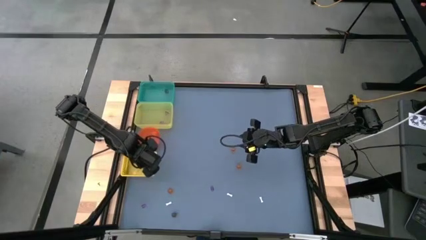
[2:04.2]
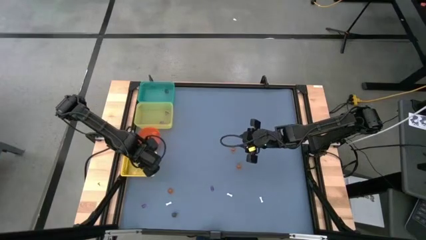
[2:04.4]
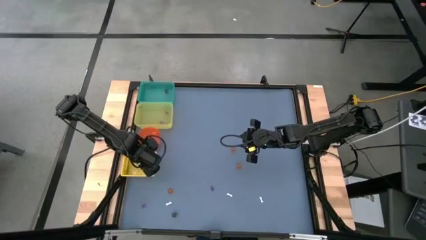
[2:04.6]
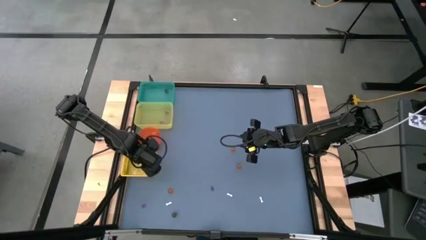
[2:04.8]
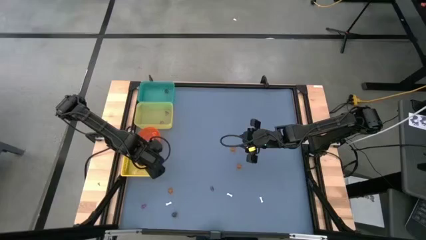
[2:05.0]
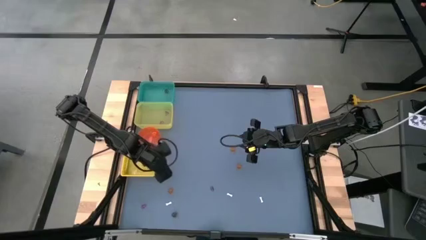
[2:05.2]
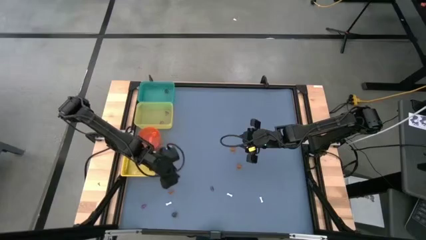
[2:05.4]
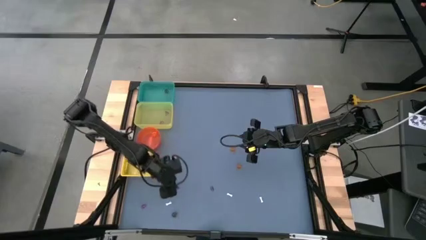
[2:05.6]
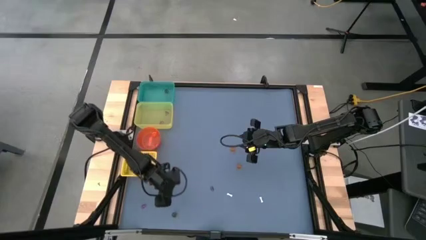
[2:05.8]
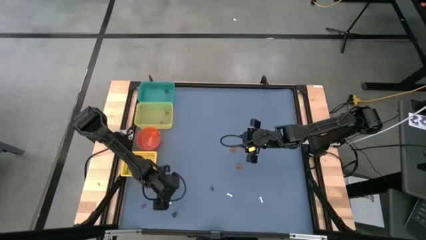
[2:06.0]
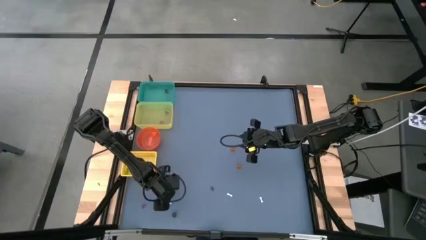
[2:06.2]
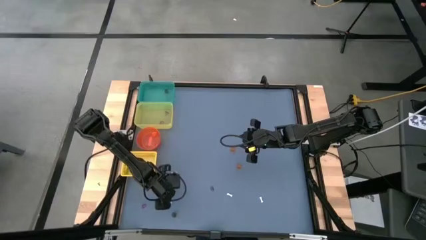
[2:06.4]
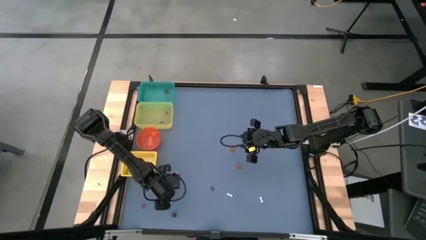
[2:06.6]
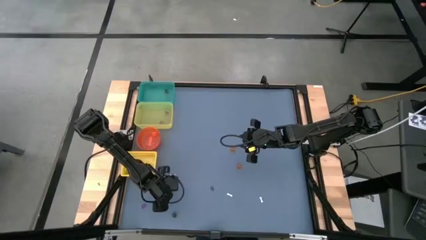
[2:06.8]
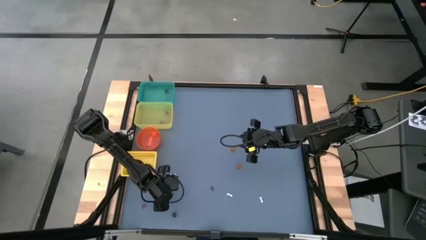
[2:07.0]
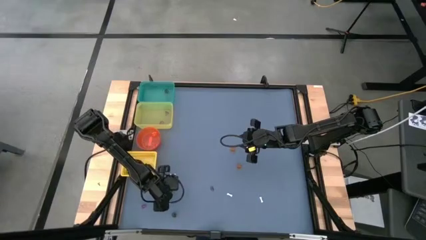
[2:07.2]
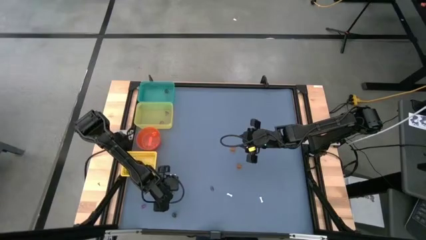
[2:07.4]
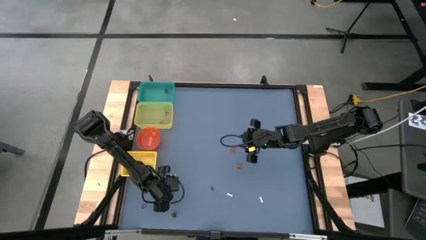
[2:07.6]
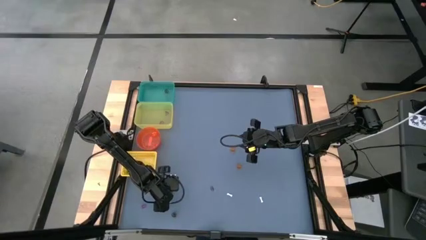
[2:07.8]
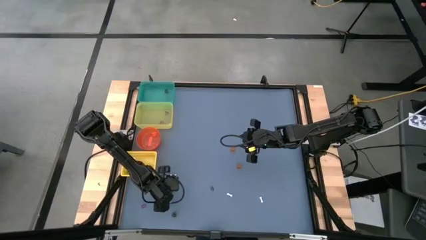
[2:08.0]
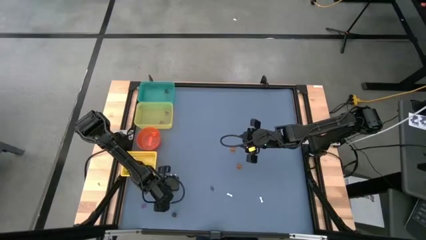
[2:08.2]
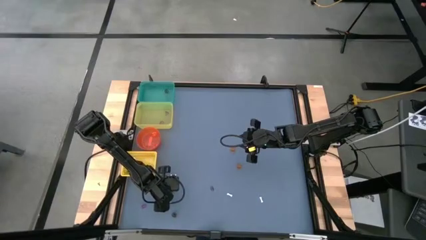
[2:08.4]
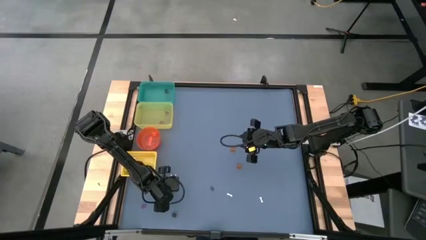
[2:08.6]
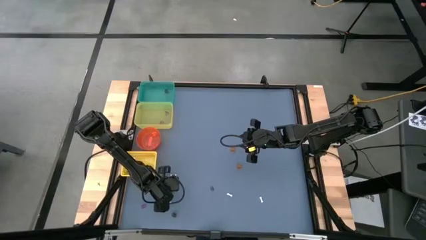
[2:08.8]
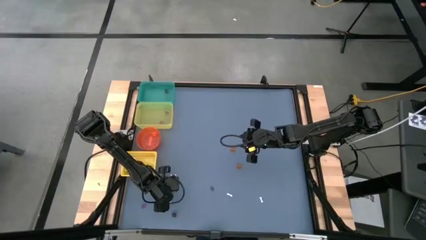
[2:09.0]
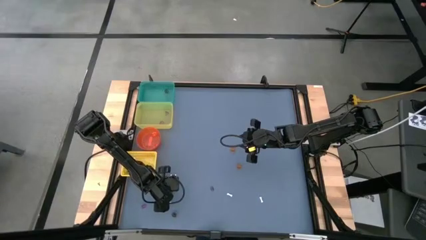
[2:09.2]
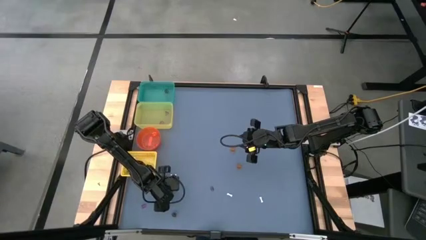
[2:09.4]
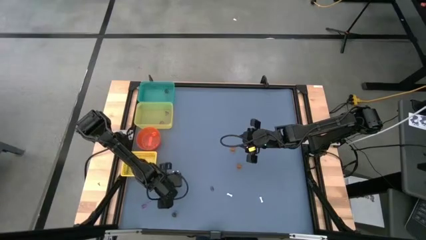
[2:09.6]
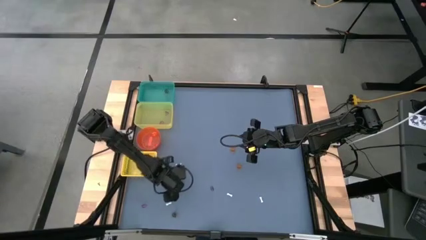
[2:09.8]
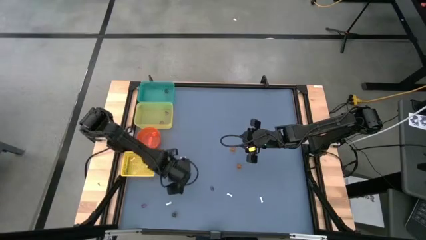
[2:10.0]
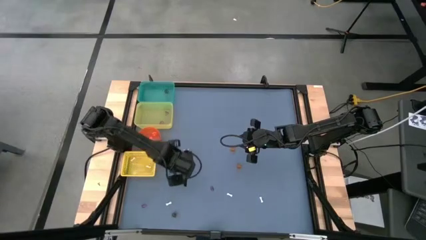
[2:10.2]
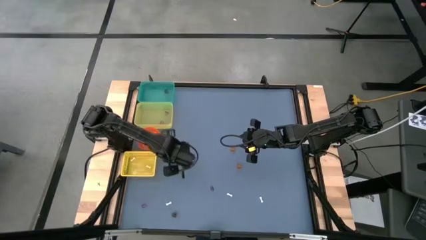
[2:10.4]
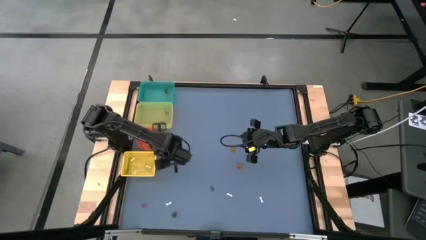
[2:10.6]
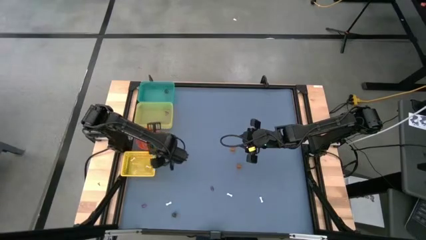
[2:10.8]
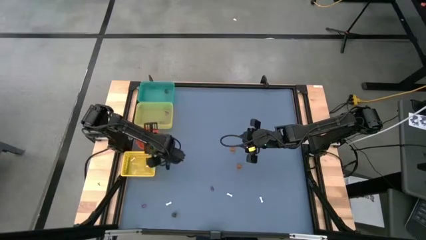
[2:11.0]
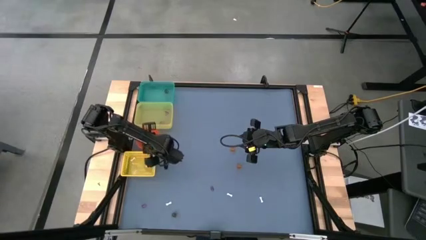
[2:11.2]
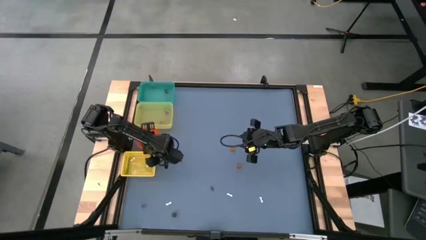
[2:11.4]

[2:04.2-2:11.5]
Task: Sort Halloween decoration
Put the left orange pumpkin toy into the orange bin

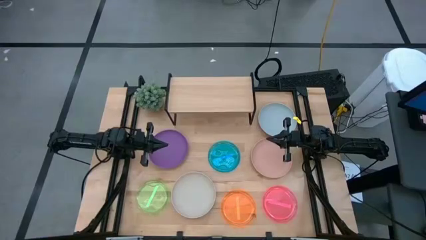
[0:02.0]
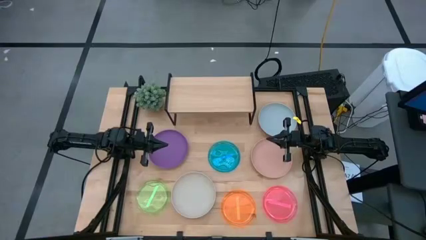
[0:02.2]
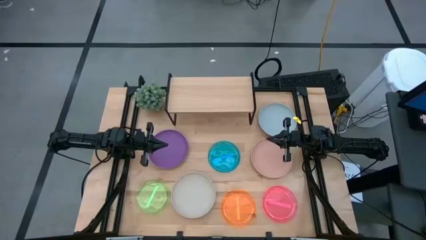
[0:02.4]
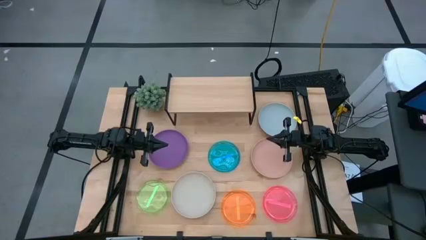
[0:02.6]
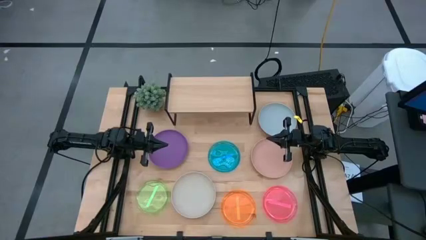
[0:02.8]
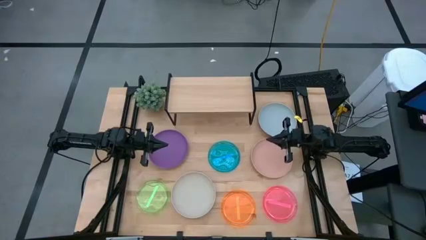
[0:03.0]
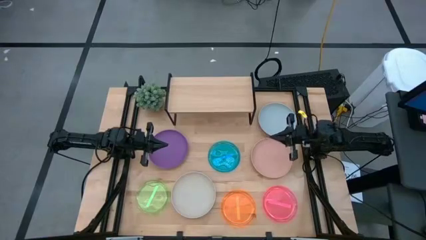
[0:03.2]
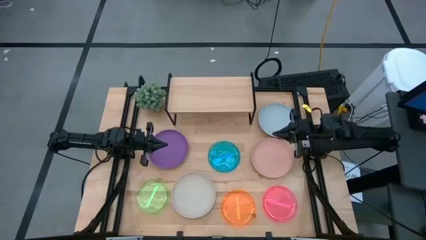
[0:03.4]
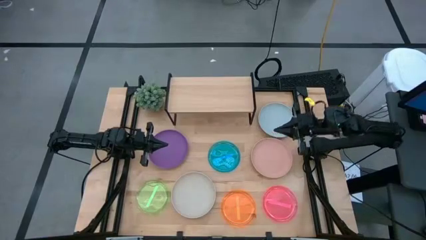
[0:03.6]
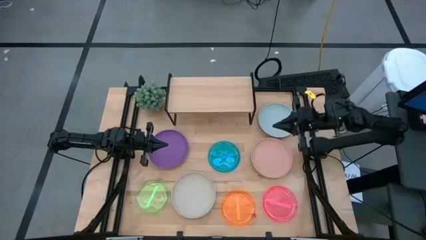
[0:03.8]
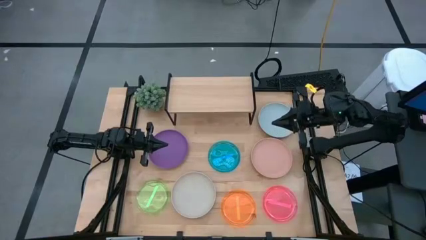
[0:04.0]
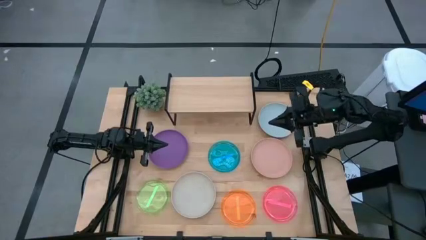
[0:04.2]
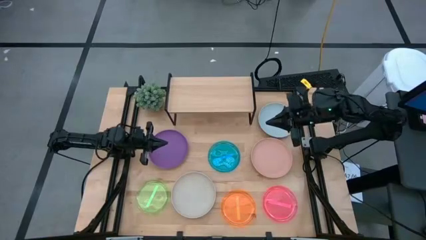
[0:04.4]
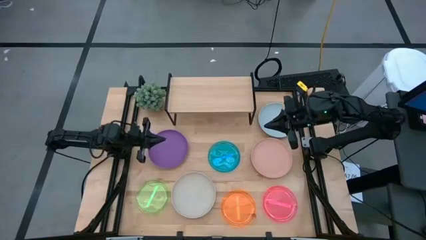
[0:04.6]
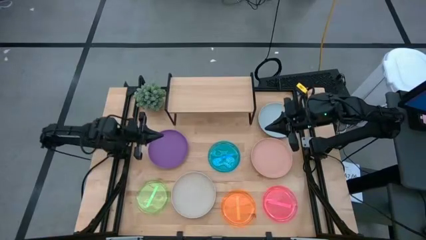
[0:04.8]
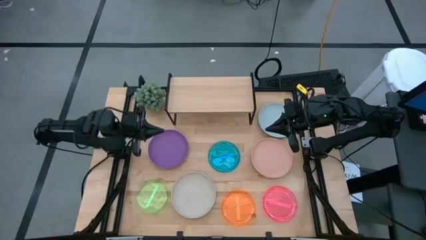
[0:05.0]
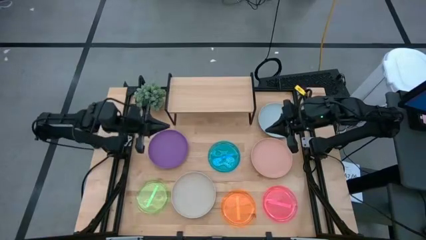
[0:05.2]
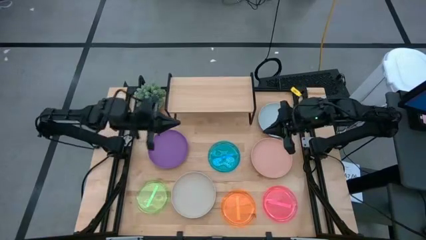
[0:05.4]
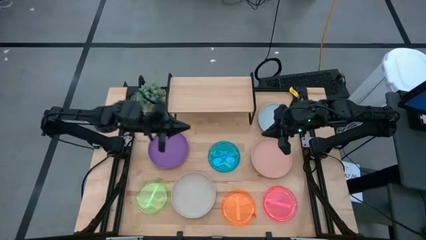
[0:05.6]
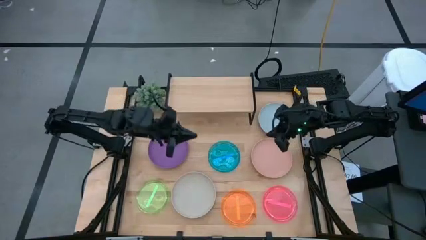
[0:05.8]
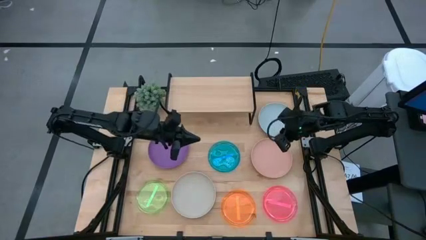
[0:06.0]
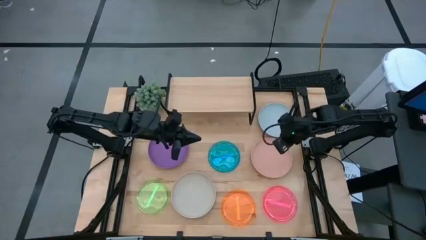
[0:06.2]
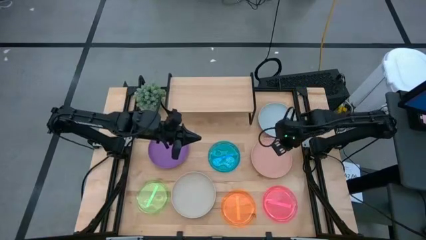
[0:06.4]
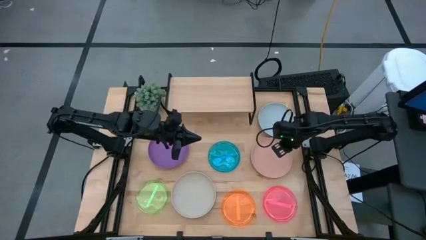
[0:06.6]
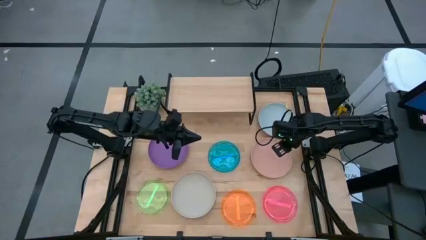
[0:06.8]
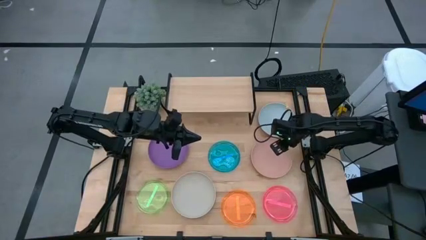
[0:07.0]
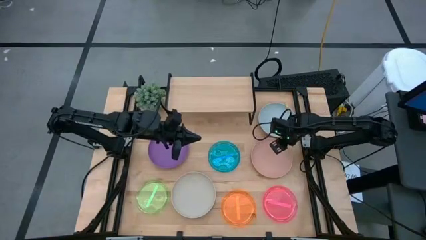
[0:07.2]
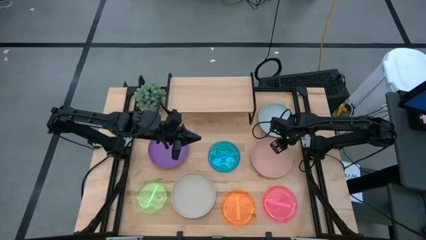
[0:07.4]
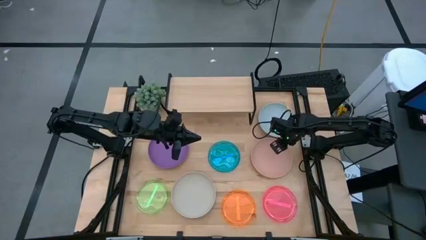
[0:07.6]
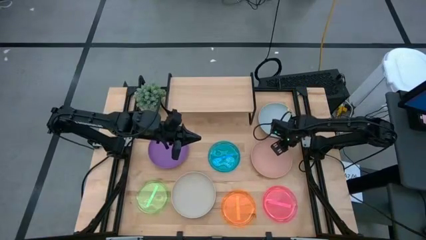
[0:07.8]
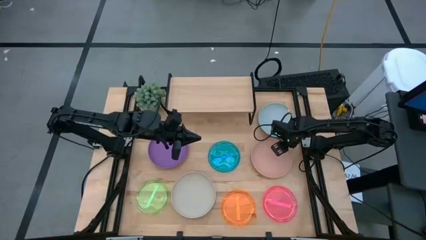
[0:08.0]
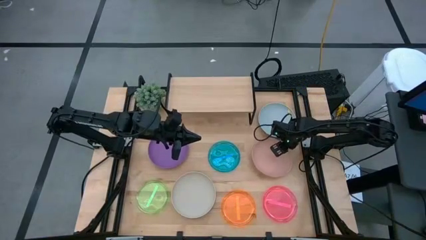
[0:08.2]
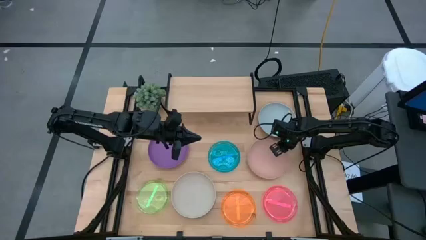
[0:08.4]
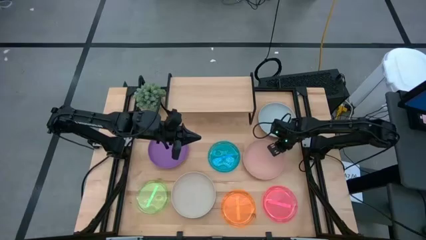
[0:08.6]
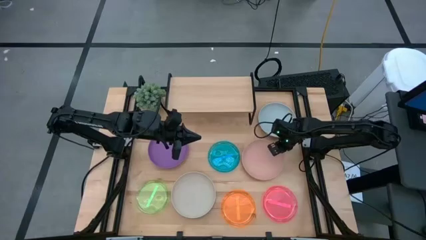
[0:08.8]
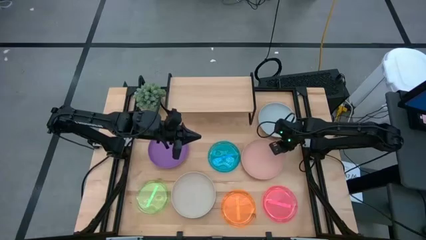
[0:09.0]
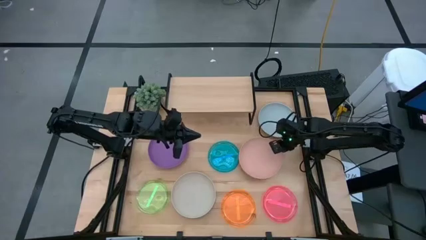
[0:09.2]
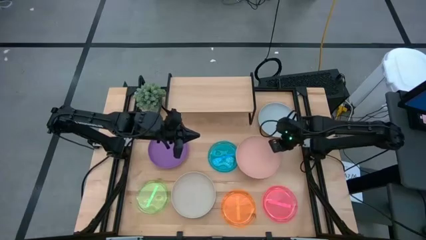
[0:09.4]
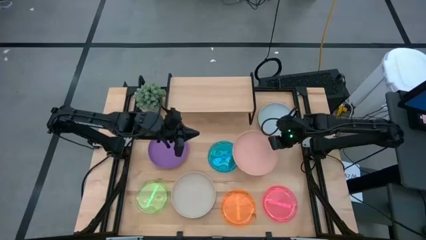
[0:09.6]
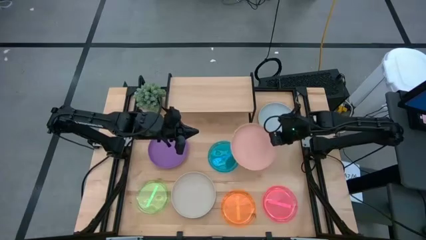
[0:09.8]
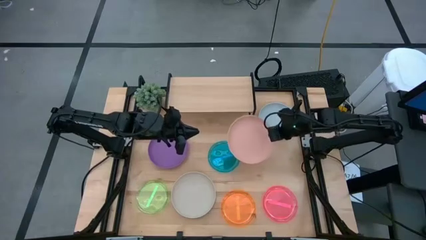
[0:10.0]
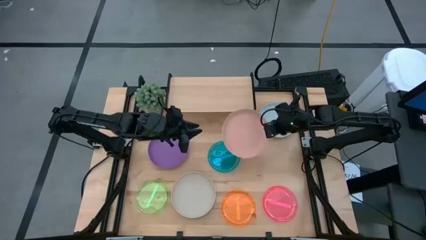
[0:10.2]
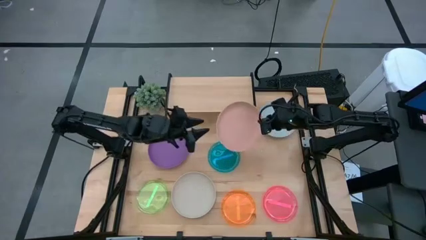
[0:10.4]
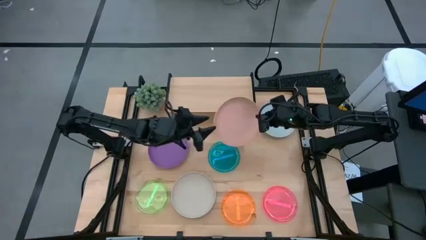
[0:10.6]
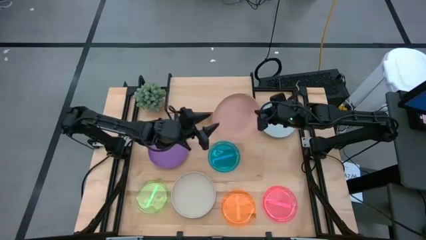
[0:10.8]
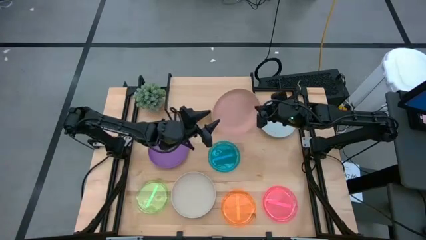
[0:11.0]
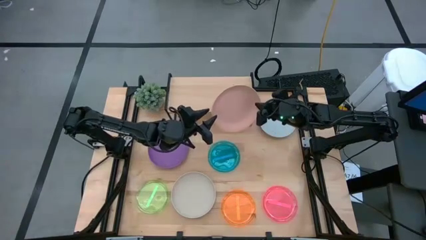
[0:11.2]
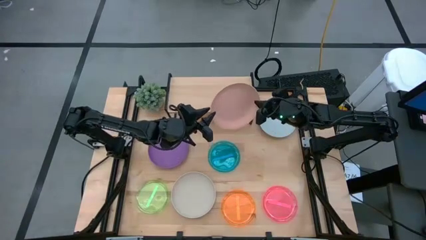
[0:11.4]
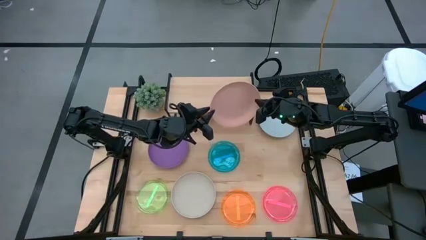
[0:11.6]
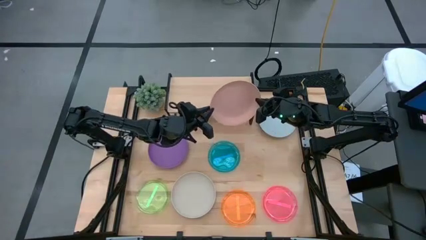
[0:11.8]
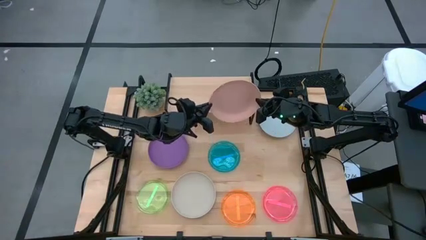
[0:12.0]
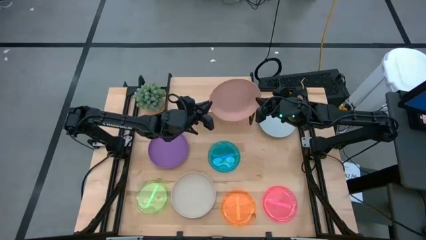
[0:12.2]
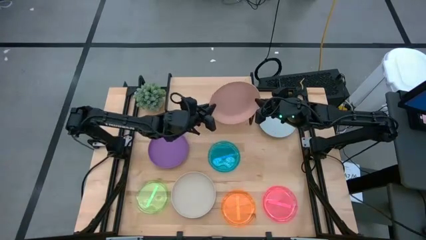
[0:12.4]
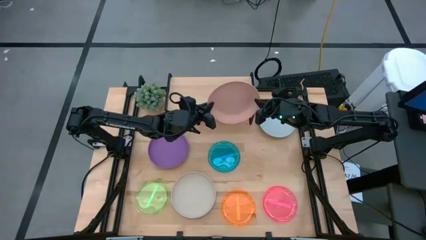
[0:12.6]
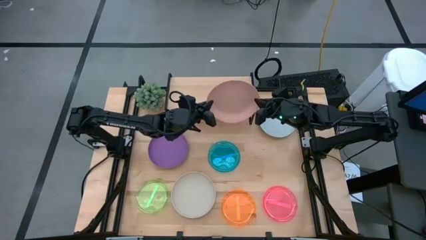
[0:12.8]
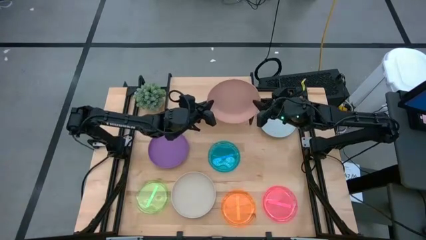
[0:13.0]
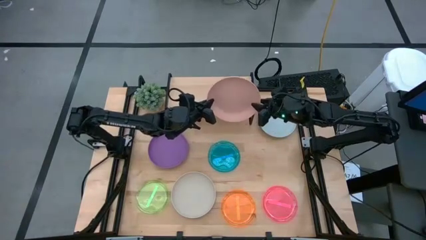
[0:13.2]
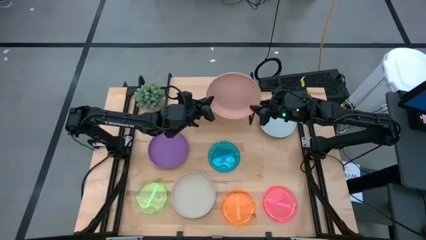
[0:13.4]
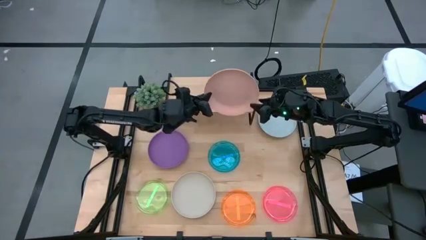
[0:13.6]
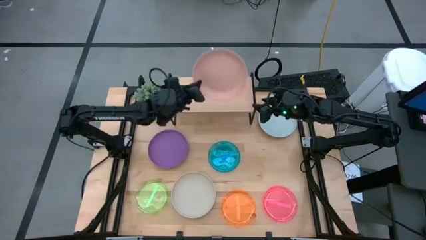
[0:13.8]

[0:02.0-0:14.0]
Task: Place and stack plates onto a shelf
Put the pink plate on the shelf
